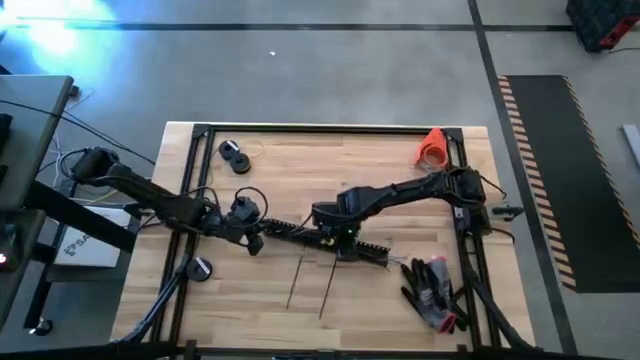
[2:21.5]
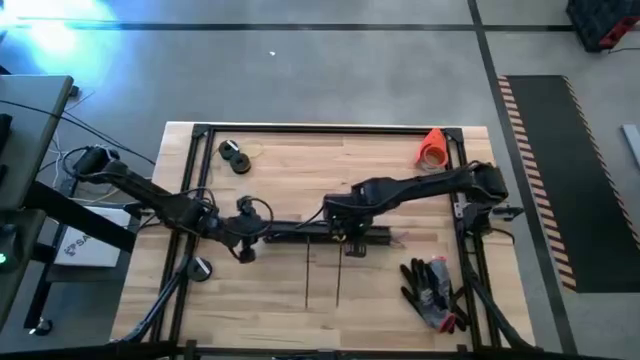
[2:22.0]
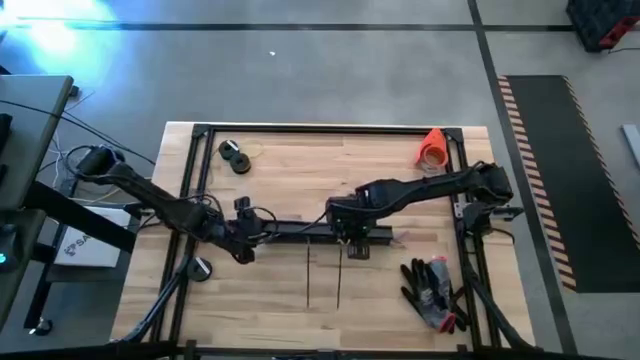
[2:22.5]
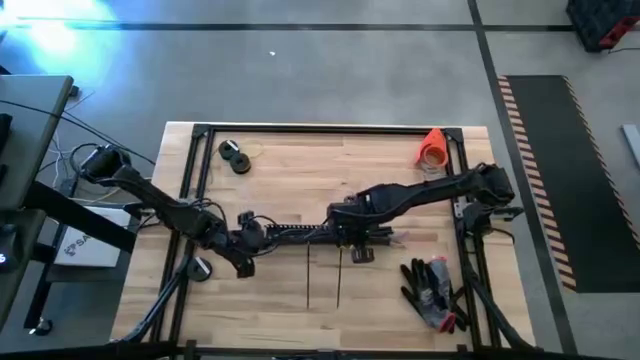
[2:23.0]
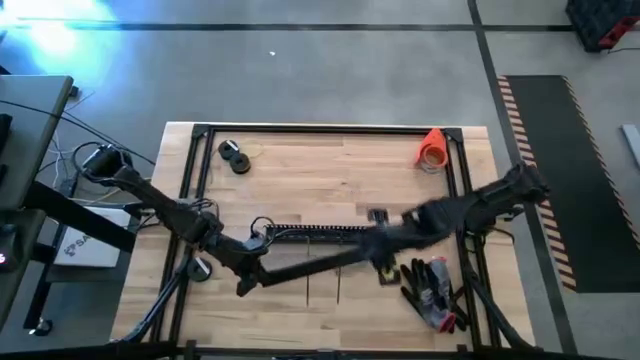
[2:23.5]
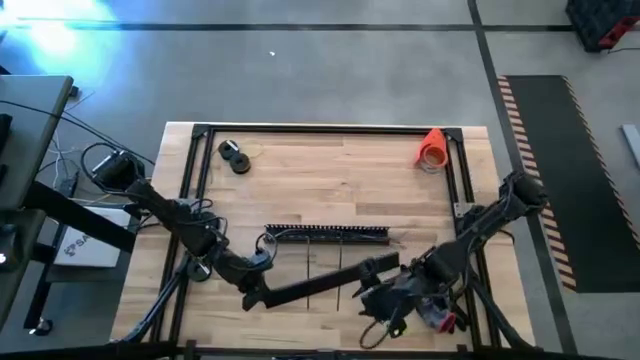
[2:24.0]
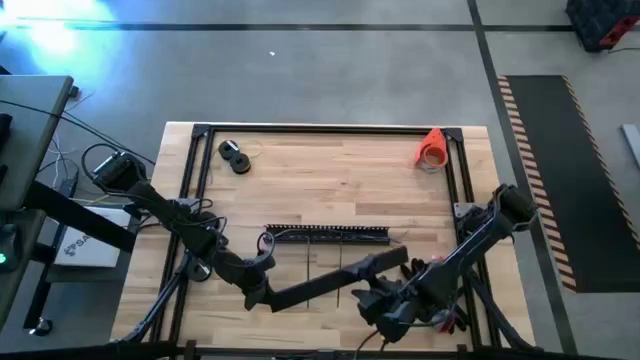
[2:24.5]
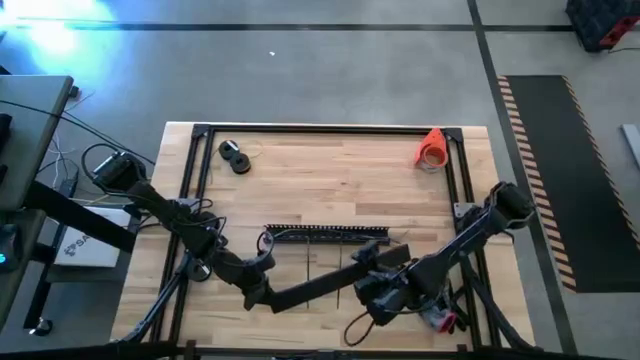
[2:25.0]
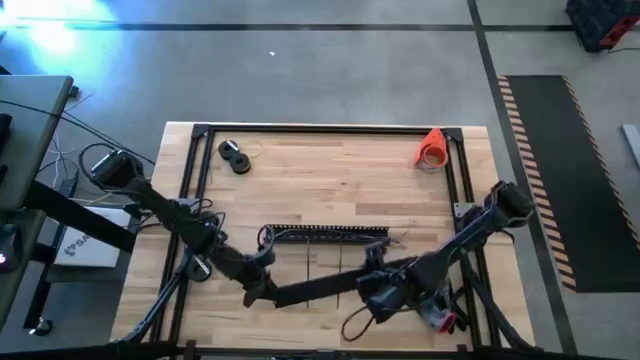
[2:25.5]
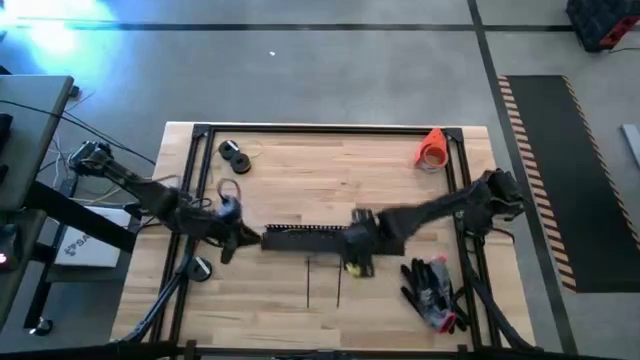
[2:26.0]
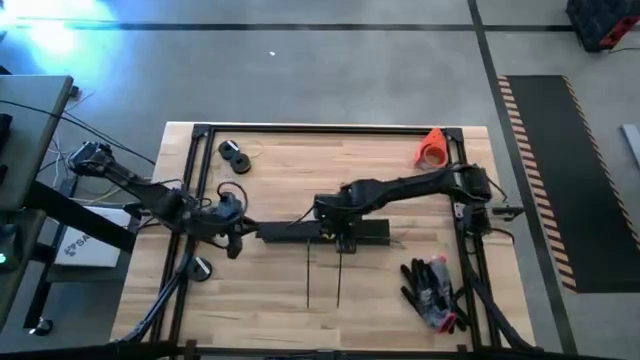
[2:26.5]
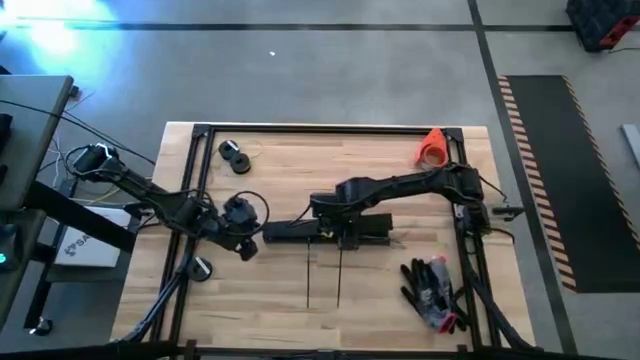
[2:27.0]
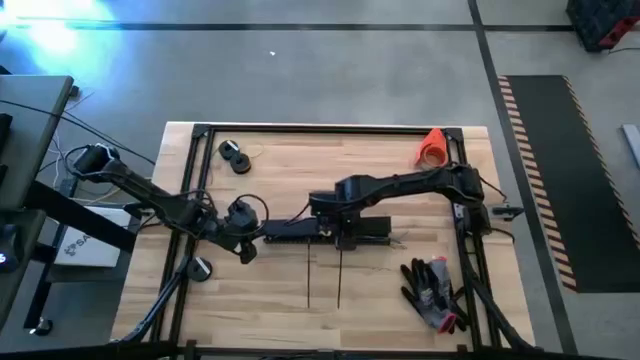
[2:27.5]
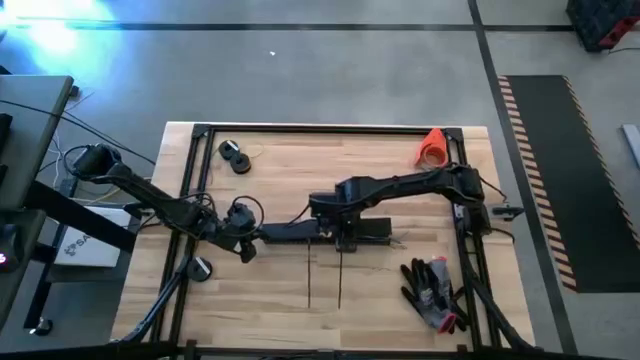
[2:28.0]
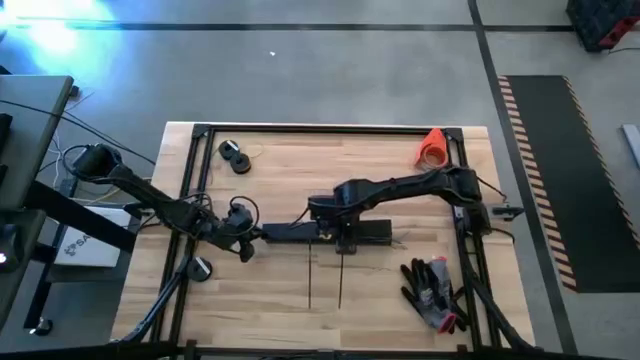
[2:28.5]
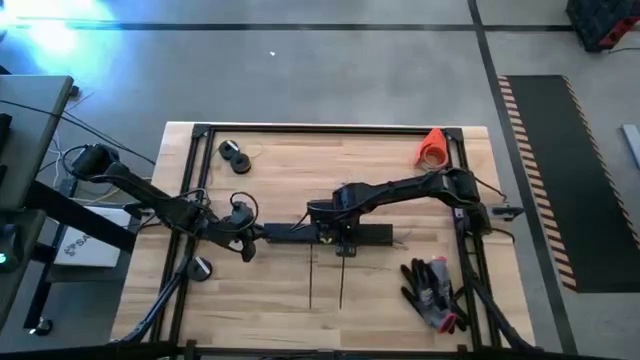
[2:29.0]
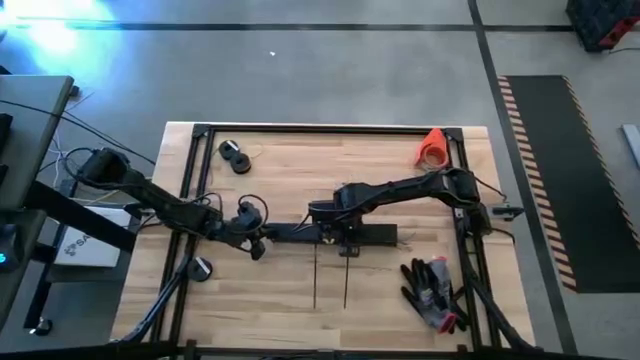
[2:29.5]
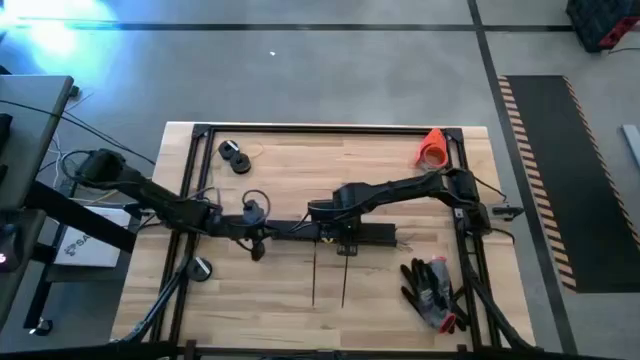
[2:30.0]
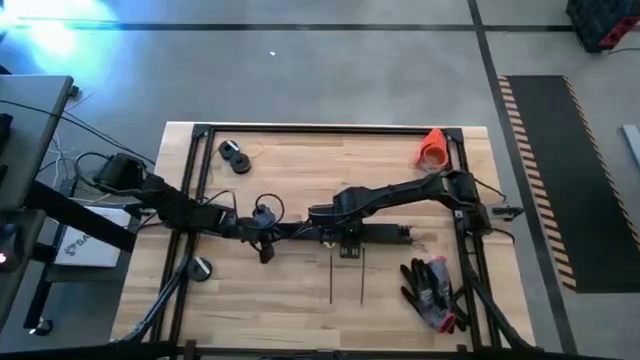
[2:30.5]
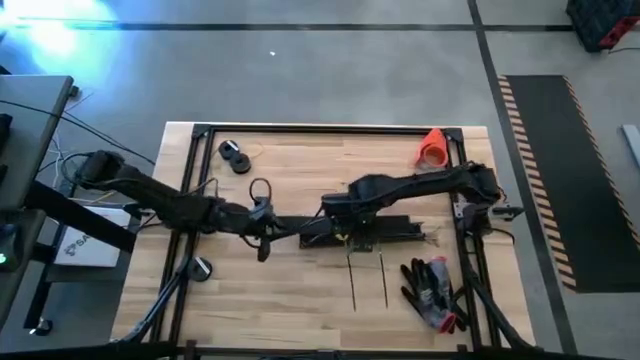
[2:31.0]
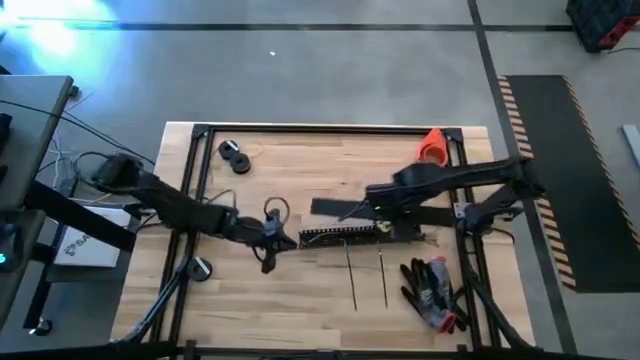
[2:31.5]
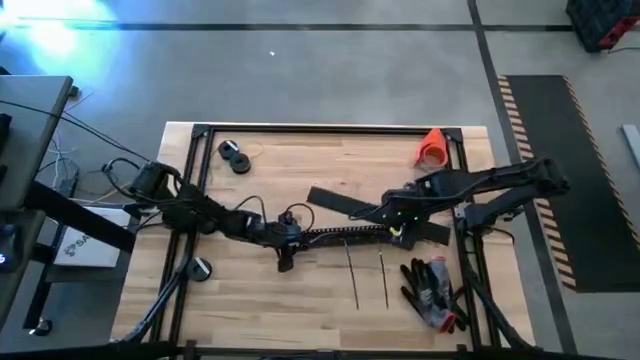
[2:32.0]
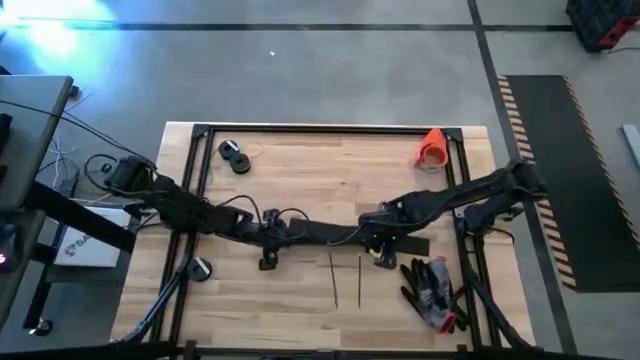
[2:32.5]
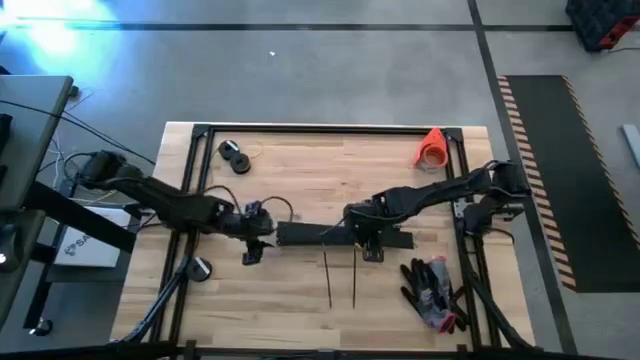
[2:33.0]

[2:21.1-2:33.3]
Task: Ziptie cables
Close the black cable duct

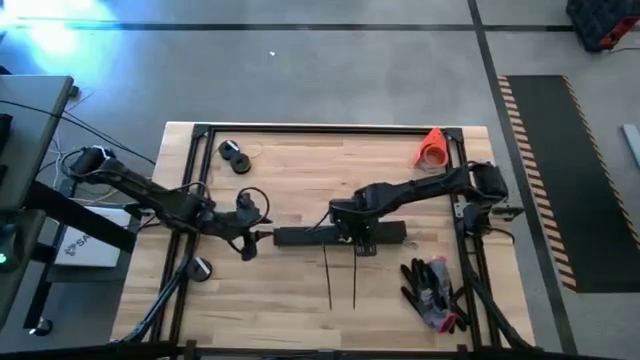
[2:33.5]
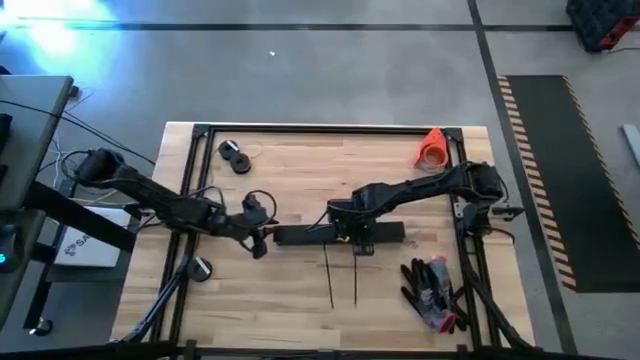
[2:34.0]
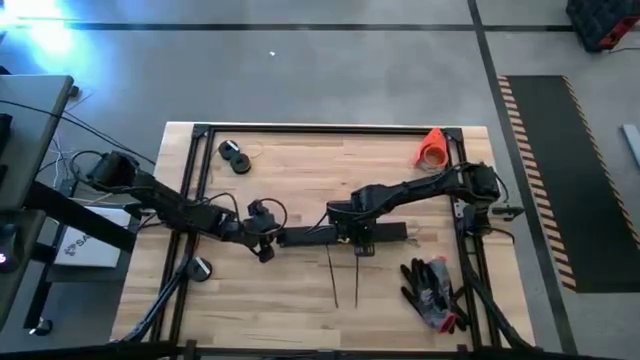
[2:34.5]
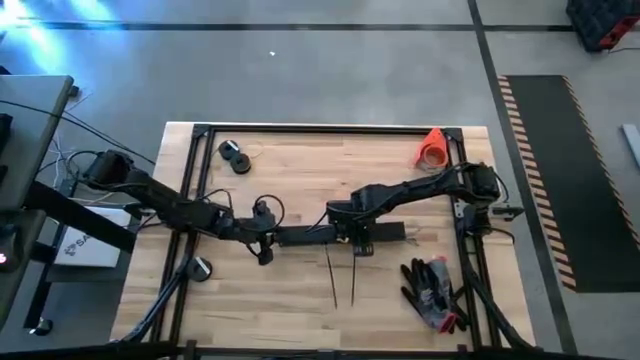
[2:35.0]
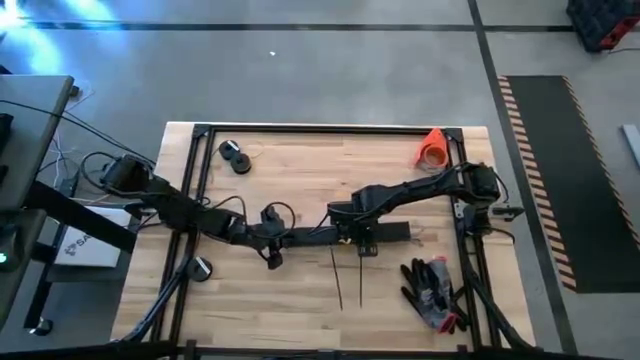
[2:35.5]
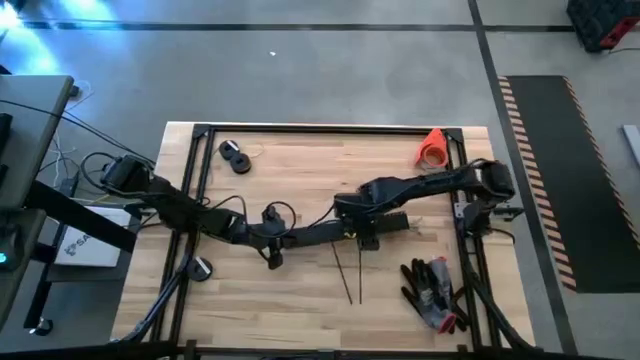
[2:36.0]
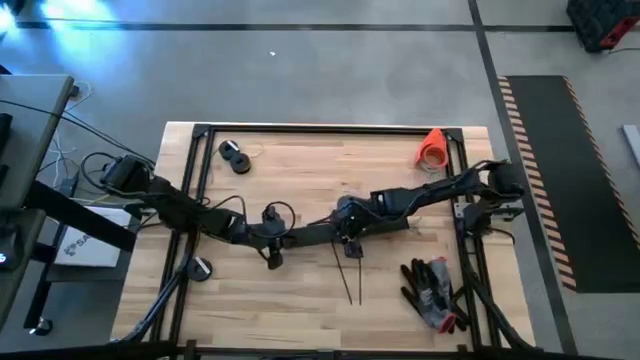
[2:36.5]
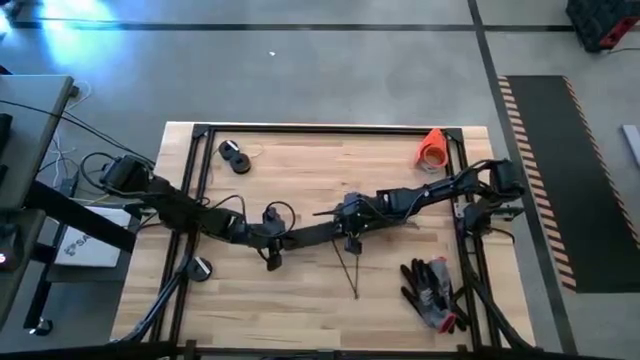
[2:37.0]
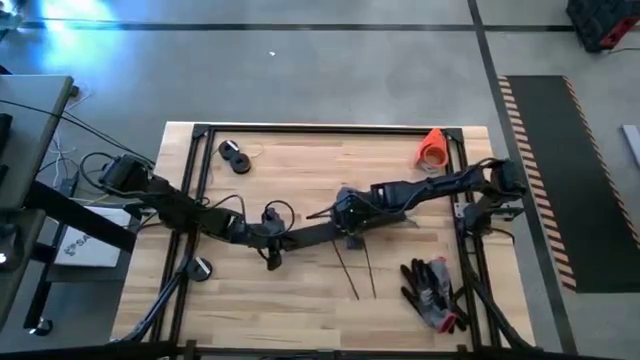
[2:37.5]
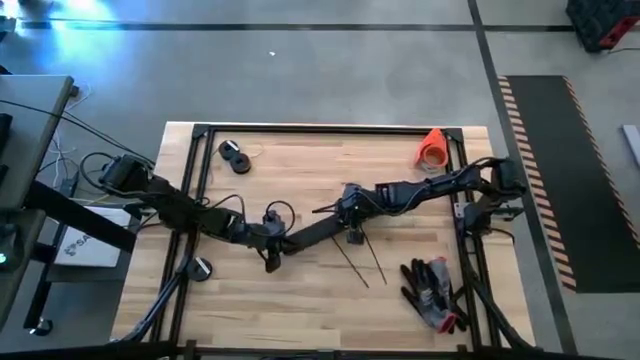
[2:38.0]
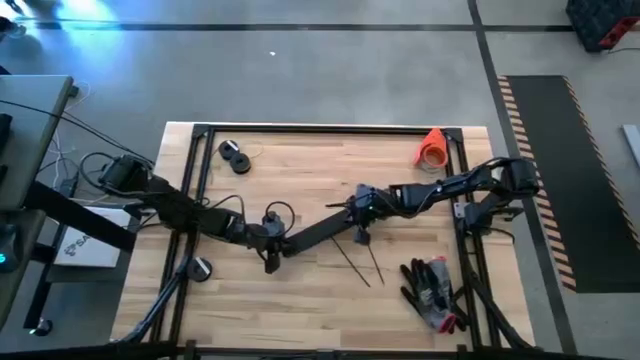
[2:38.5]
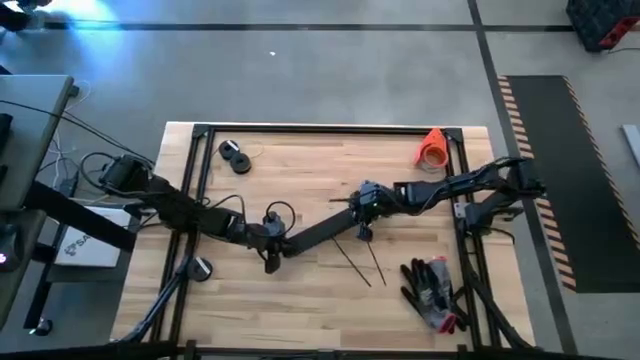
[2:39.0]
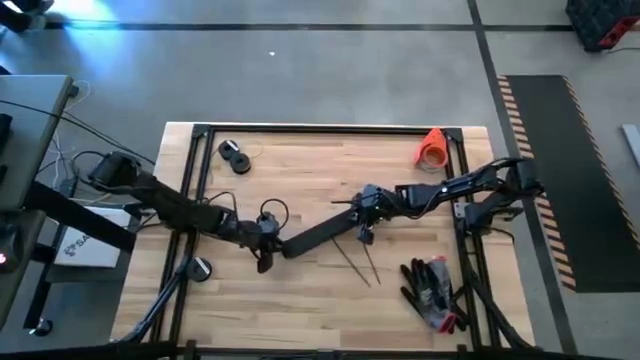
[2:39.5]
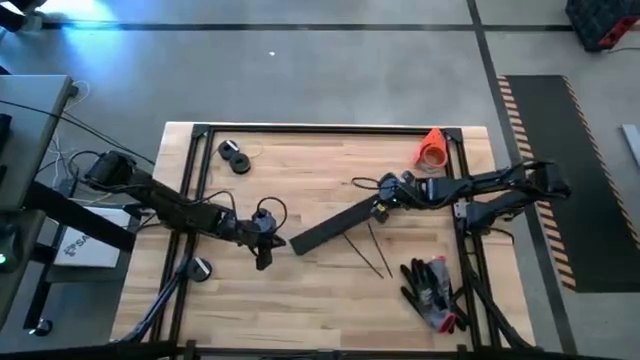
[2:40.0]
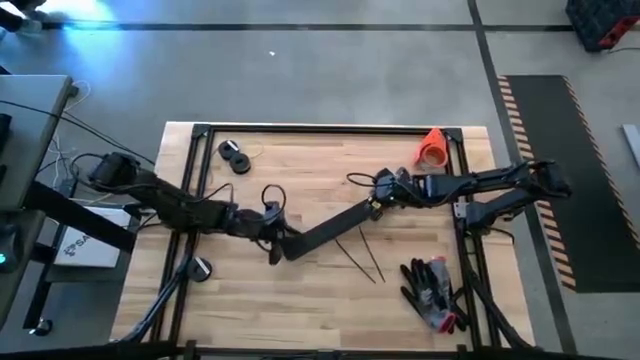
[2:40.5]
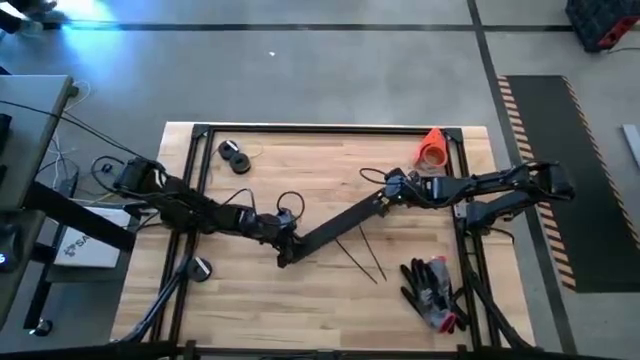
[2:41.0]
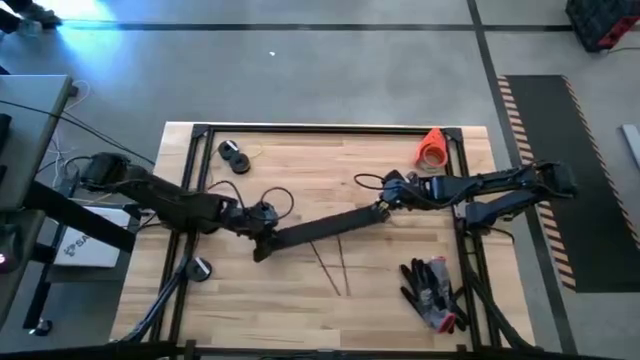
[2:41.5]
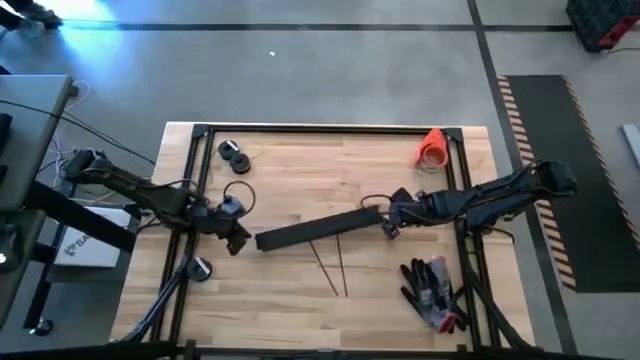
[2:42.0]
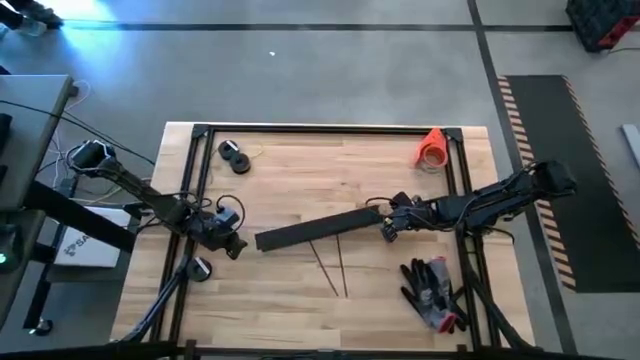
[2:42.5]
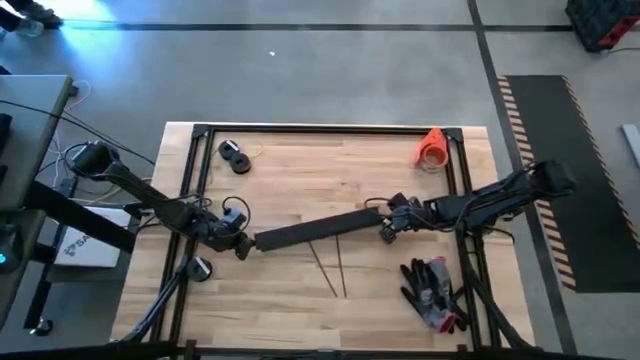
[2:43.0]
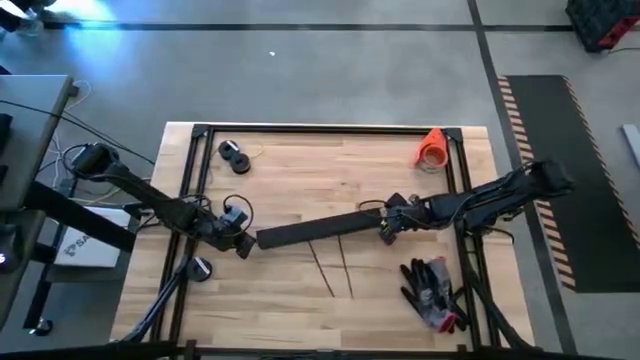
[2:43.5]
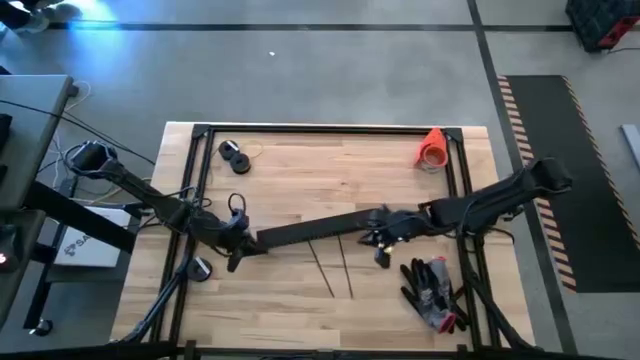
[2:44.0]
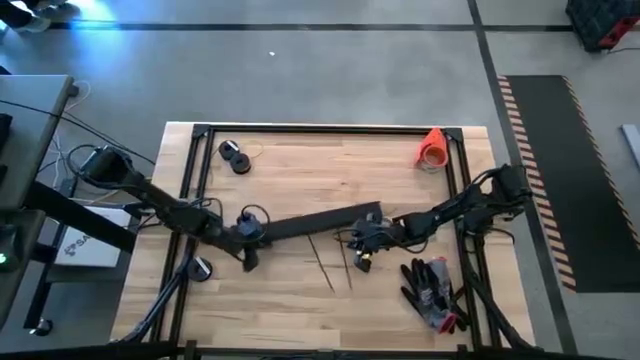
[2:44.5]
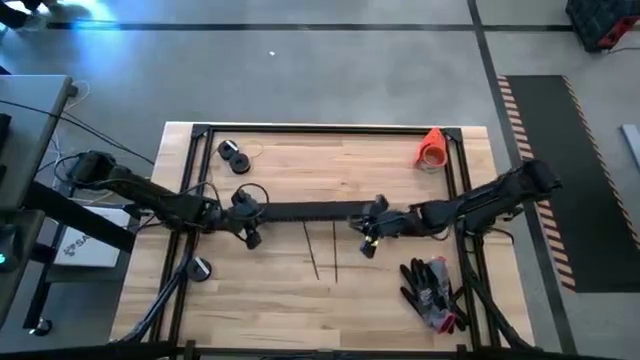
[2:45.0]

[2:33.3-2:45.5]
Close the black cable duct
